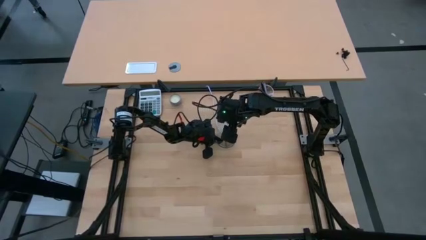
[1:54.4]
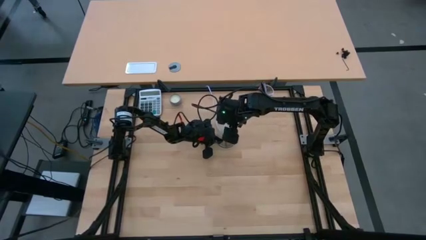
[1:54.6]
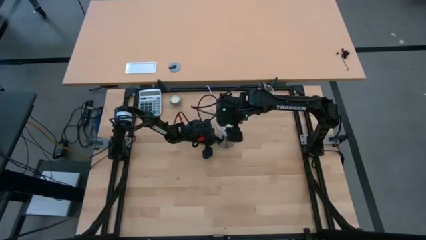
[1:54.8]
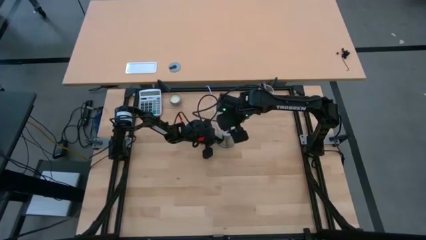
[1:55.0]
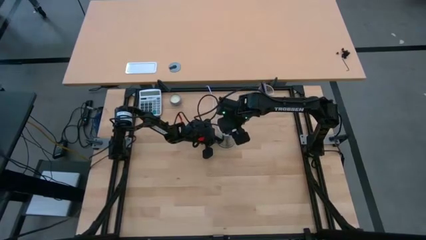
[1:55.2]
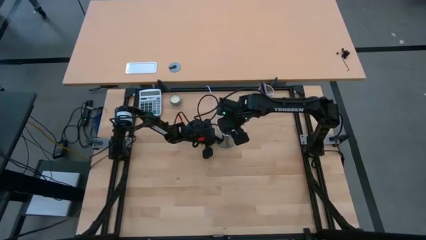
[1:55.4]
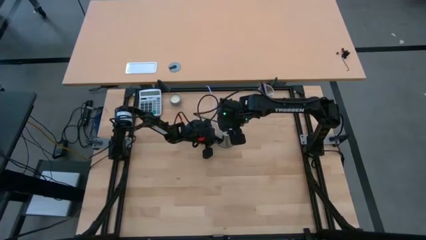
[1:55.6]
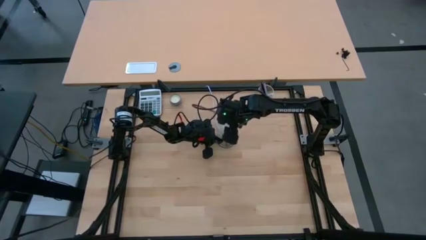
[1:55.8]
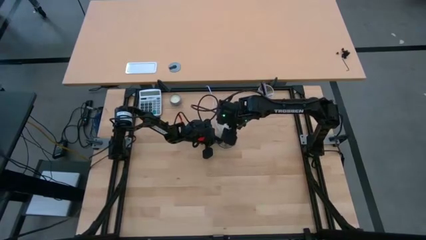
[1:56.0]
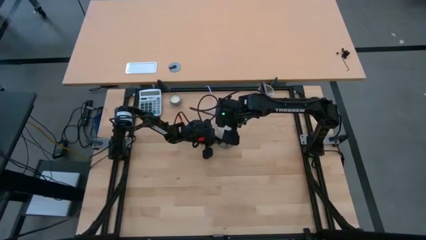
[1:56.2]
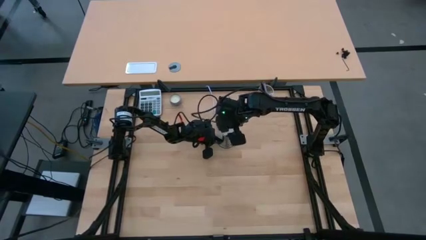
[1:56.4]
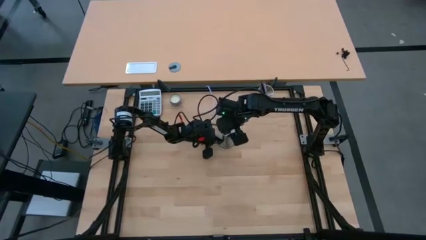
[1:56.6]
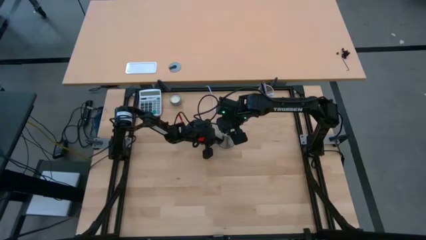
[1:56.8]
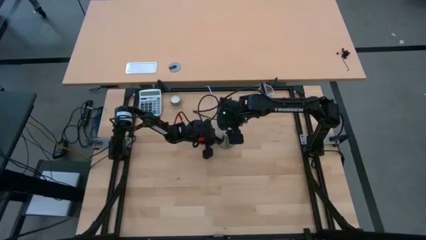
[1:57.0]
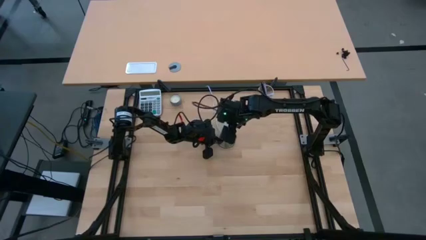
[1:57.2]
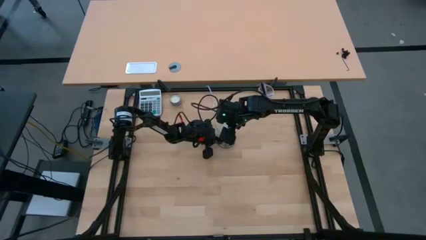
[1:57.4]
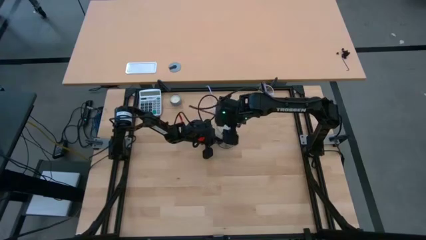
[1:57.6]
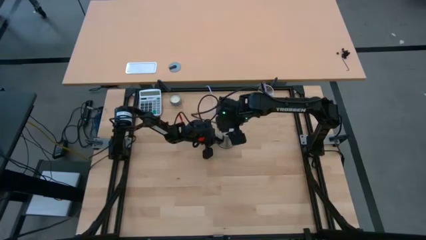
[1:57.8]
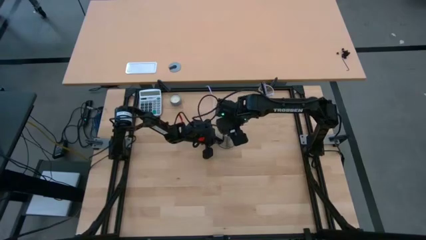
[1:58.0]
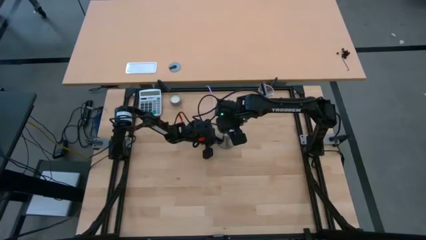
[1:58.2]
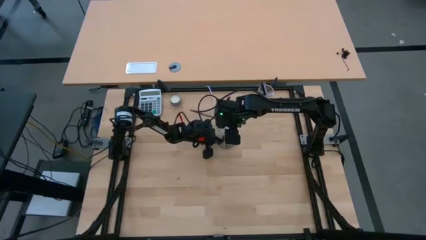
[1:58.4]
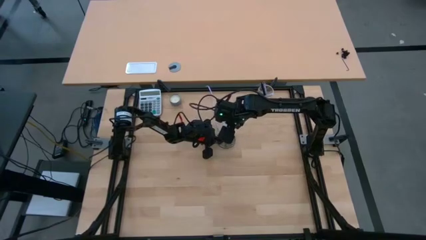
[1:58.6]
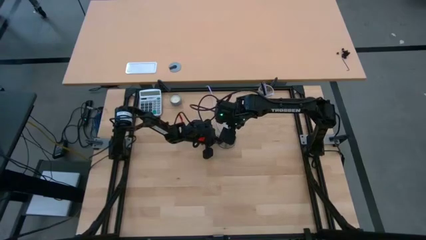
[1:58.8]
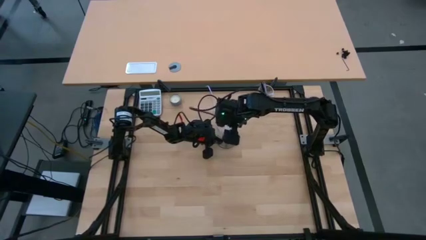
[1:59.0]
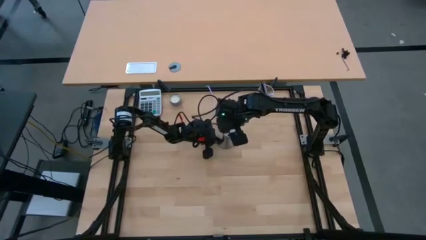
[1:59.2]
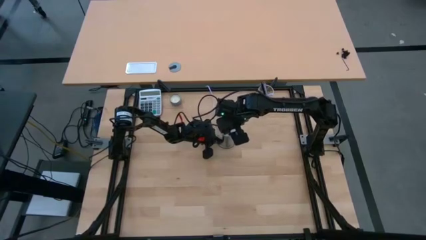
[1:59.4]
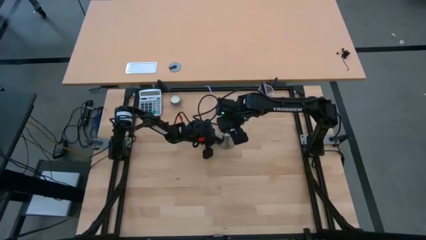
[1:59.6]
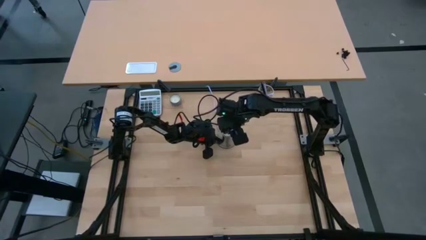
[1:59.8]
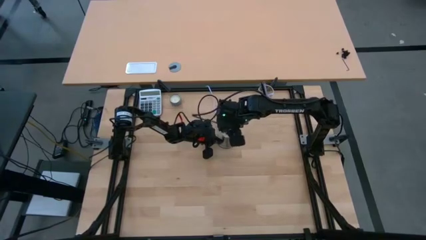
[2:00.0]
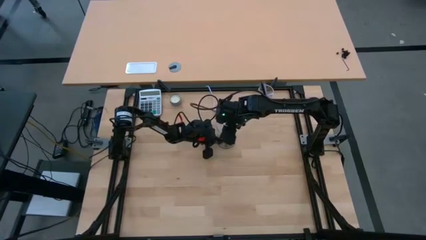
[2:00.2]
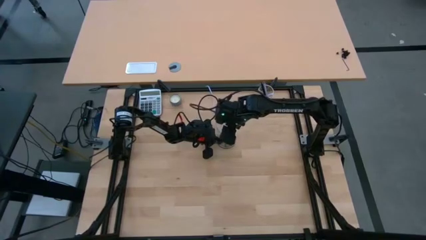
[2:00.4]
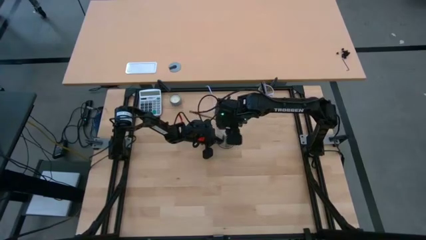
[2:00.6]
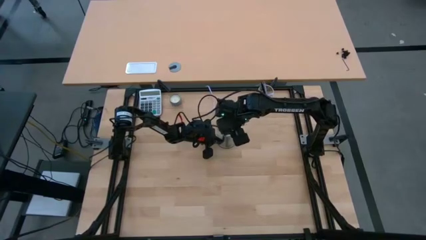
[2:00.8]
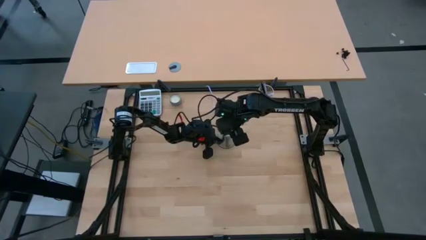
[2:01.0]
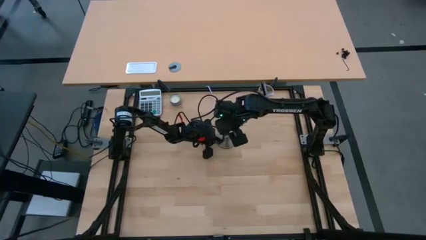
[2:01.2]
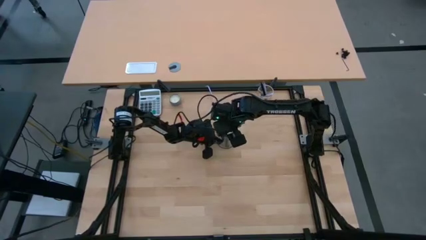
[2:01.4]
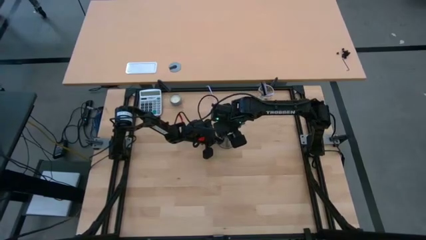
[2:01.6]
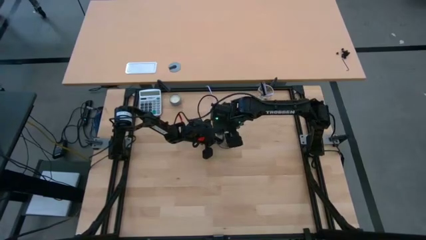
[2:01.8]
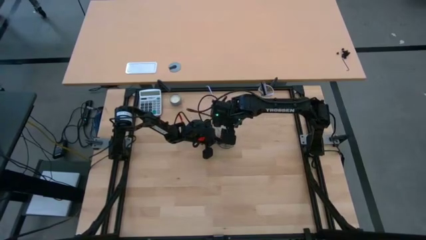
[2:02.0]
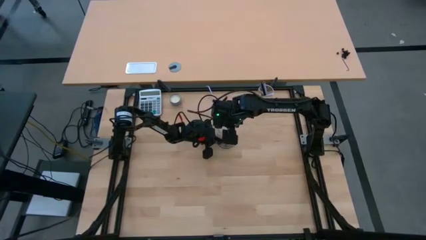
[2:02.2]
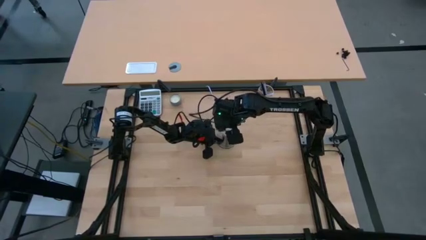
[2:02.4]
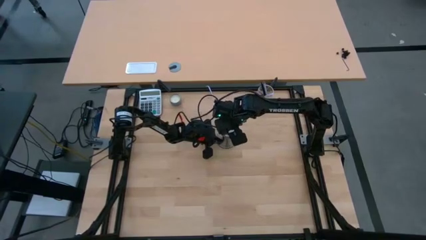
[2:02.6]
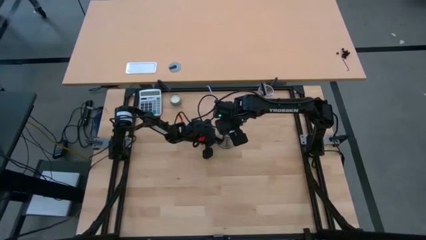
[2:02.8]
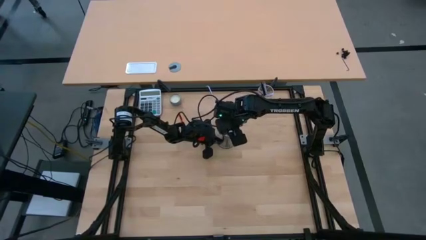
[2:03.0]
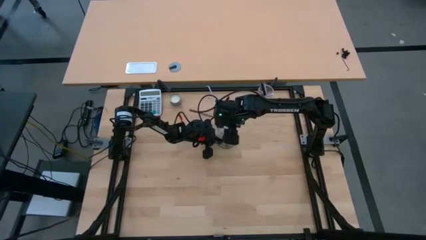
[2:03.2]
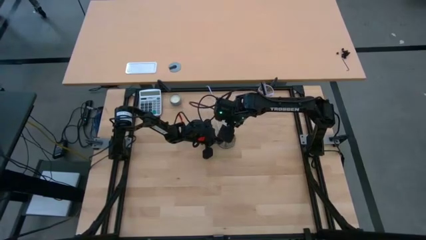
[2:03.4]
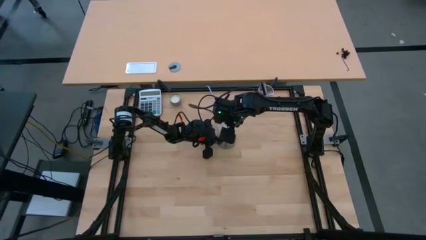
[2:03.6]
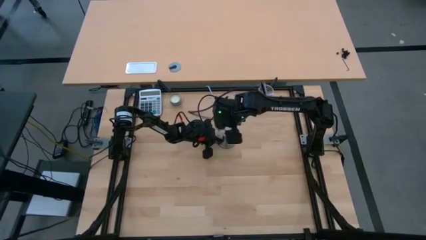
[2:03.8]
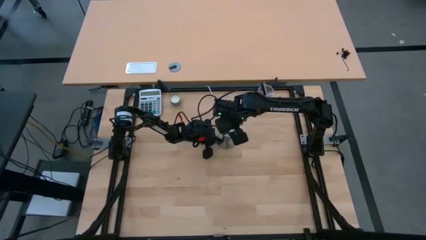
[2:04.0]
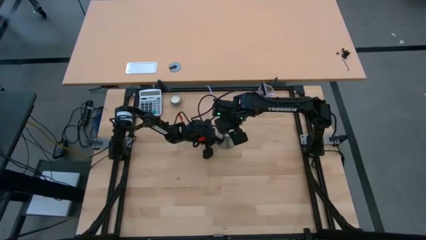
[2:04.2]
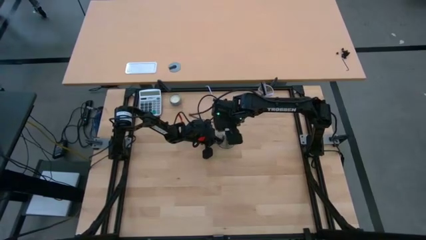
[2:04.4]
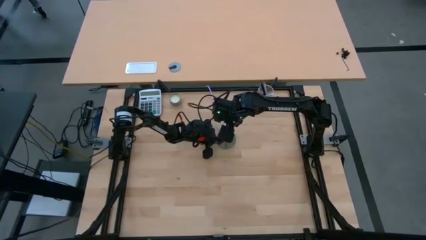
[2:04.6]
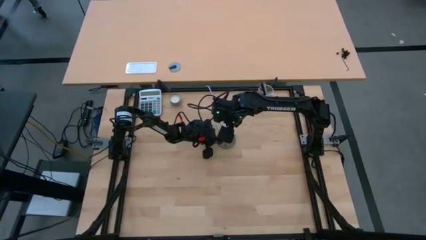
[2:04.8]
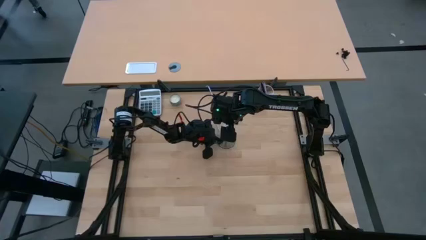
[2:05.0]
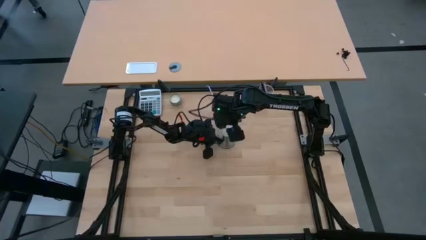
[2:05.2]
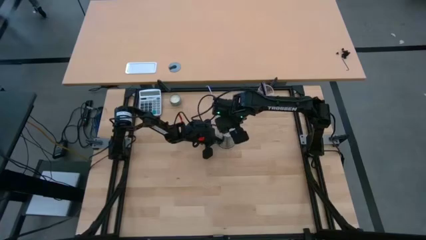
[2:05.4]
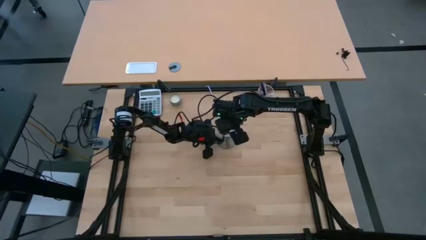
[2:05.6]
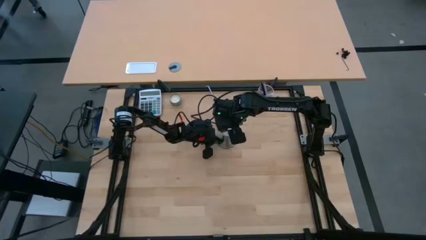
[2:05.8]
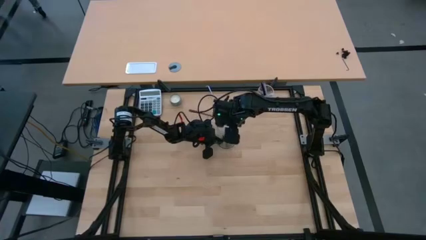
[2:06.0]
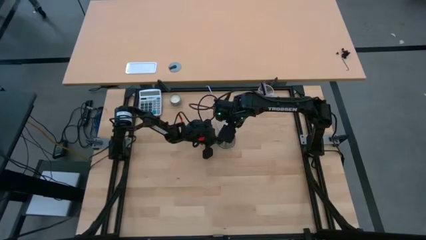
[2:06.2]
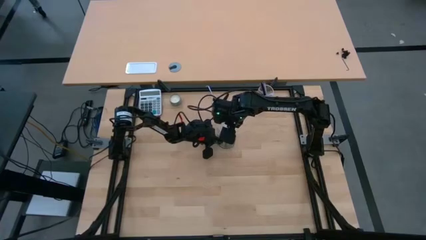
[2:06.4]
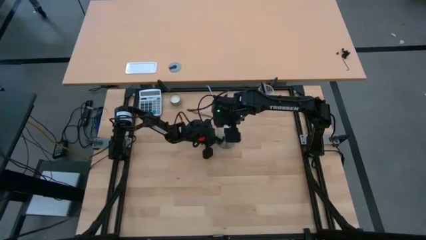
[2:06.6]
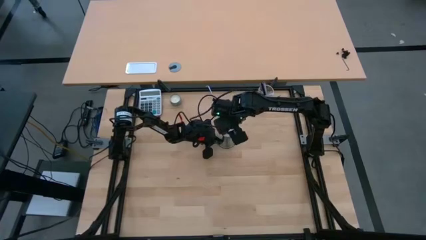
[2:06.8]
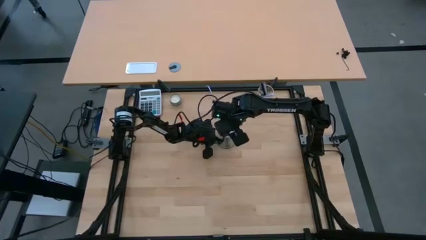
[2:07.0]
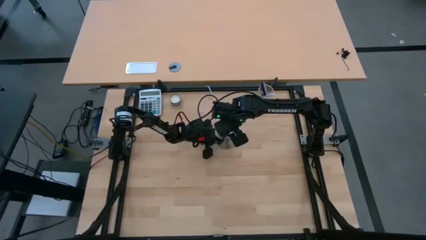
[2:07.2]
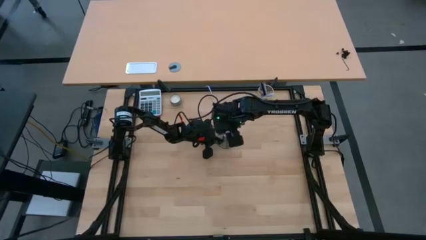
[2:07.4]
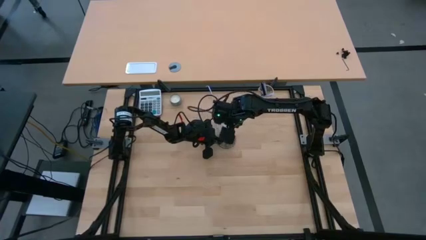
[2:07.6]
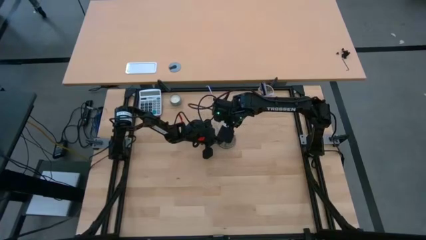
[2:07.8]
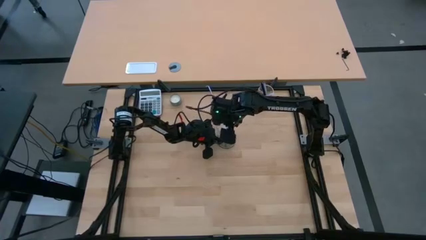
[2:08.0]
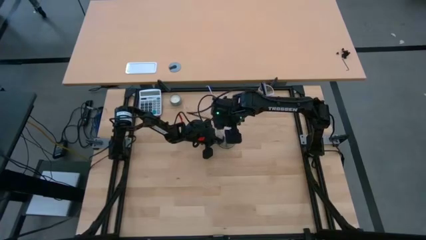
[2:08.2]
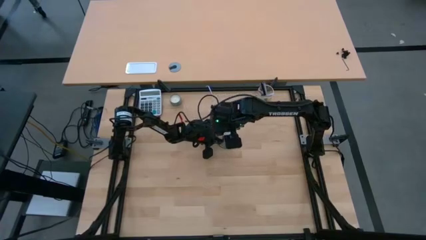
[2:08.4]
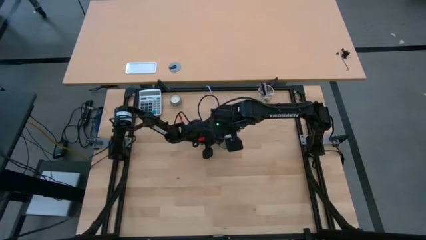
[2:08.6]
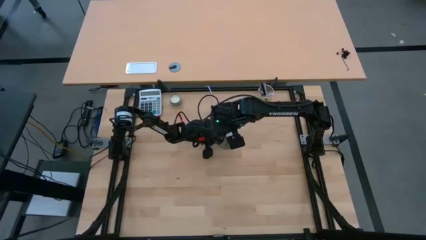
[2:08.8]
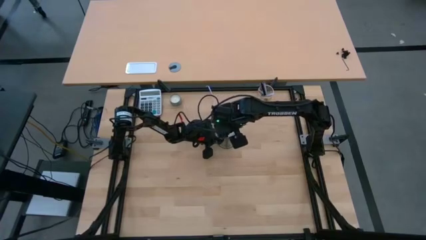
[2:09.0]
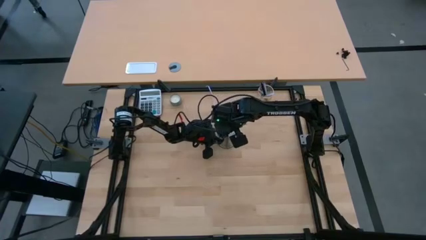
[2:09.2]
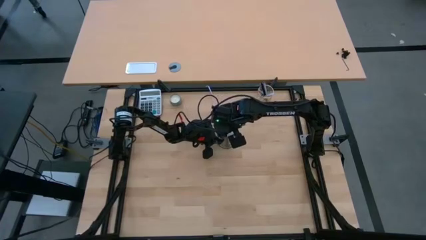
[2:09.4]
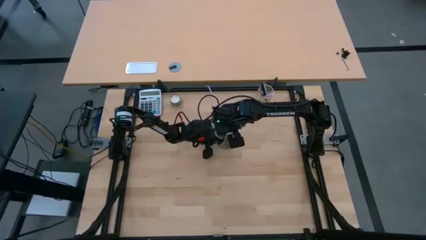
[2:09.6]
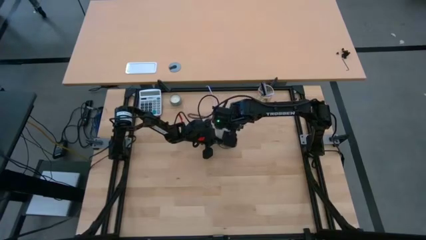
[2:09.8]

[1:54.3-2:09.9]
Task: Screw lightbulb
Insert the lightbulb into the lamp

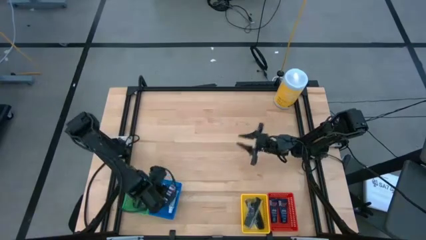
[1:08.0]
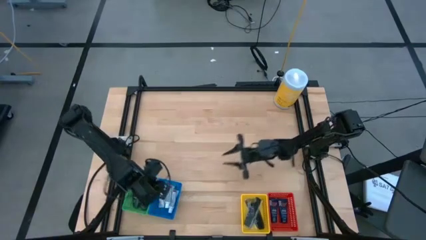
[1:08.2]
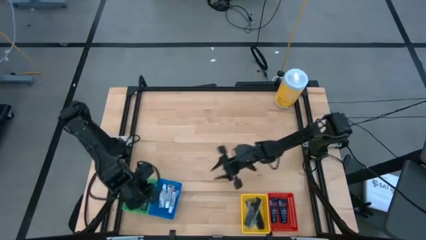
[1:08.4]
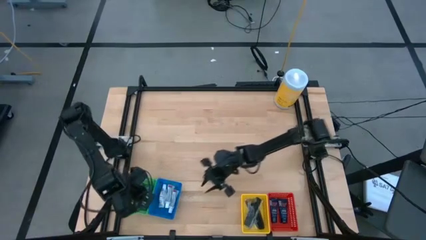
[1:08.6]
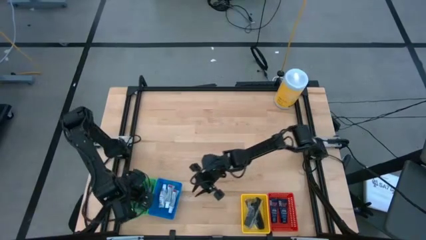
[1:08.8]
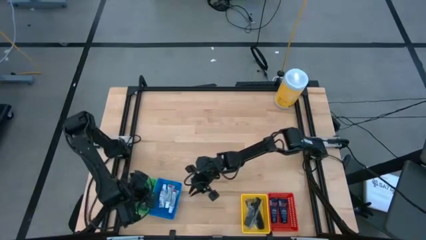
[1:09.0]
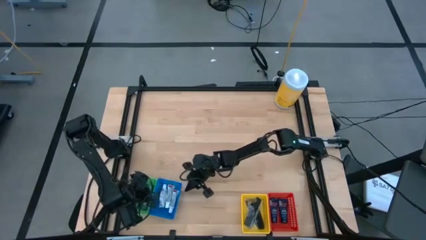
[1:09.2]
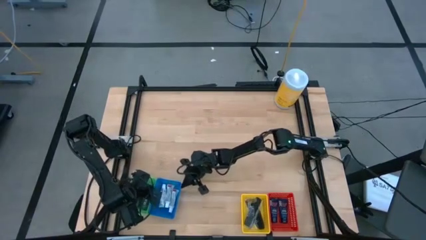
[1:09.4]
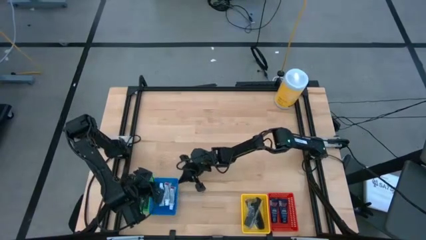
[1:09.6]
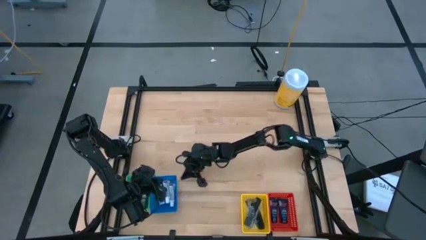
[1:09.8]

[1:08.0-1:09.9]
Task: Pick & Place Travel size toiletries
Adjust the blue bin and the green bin on the table
